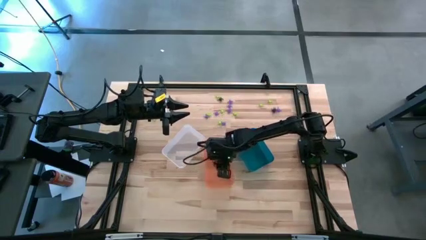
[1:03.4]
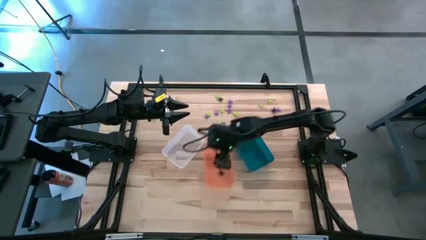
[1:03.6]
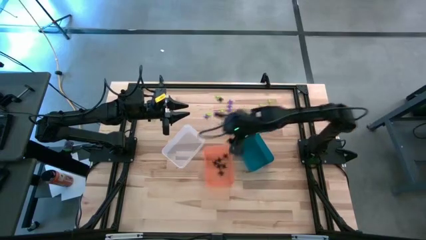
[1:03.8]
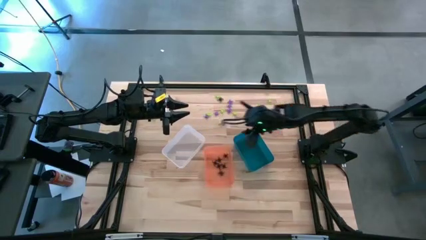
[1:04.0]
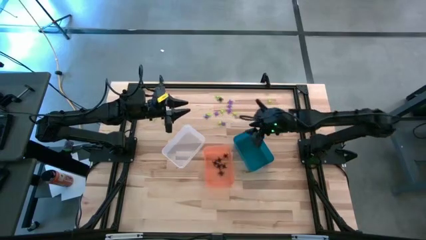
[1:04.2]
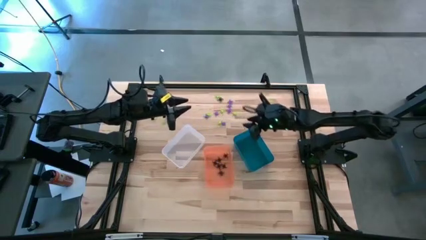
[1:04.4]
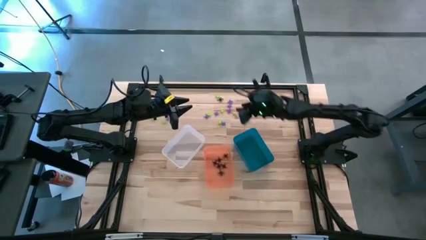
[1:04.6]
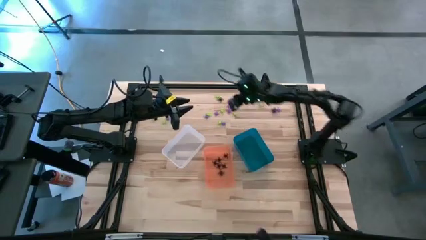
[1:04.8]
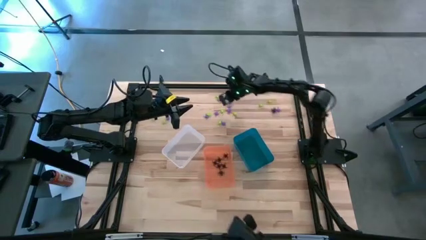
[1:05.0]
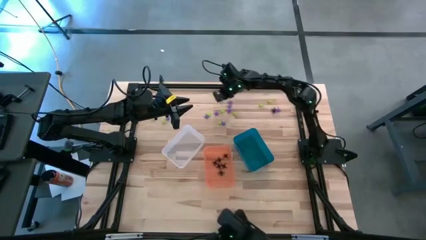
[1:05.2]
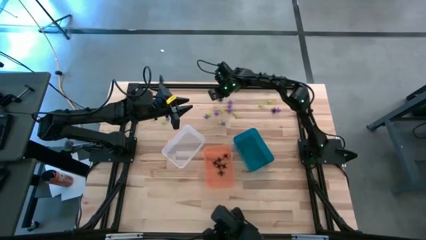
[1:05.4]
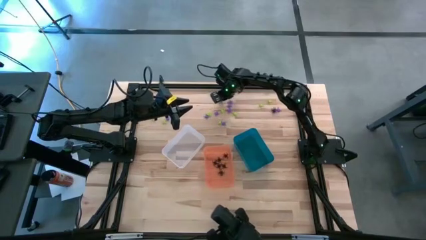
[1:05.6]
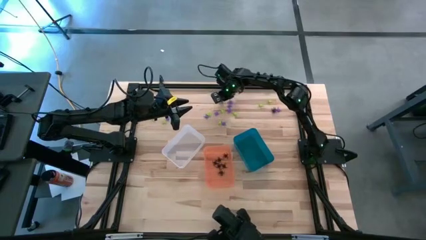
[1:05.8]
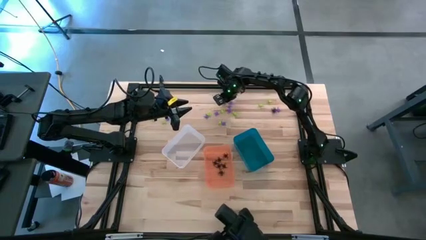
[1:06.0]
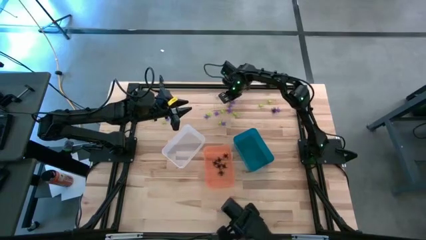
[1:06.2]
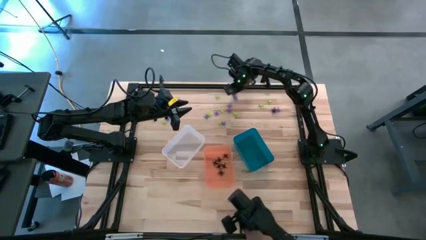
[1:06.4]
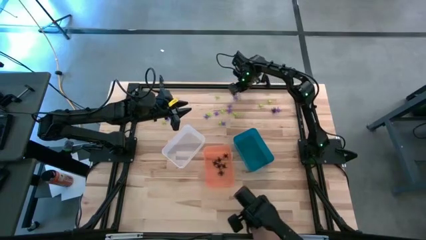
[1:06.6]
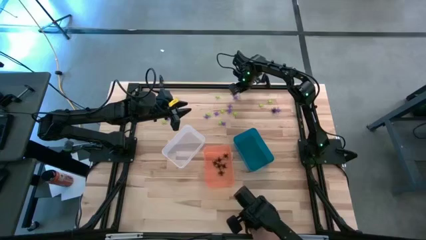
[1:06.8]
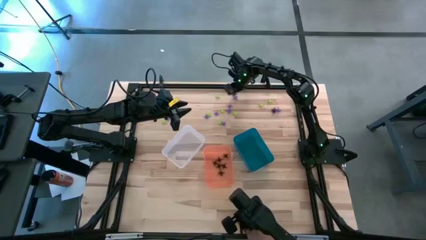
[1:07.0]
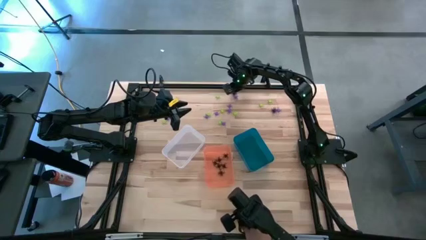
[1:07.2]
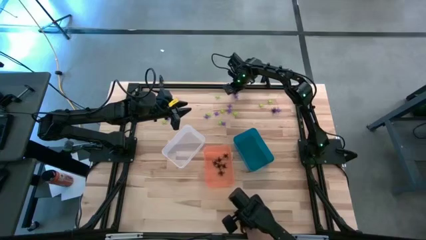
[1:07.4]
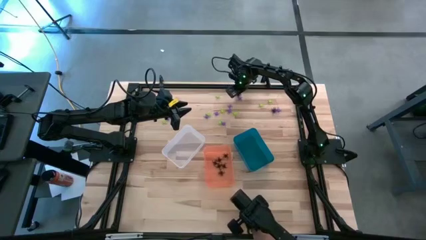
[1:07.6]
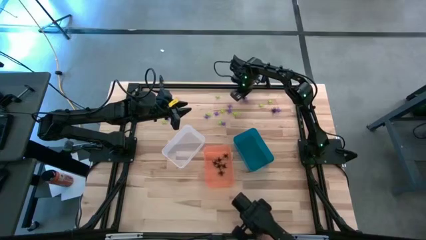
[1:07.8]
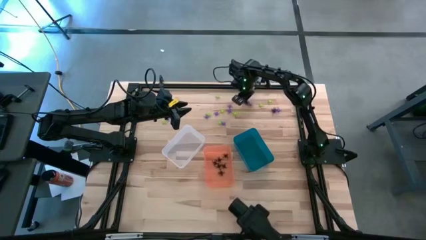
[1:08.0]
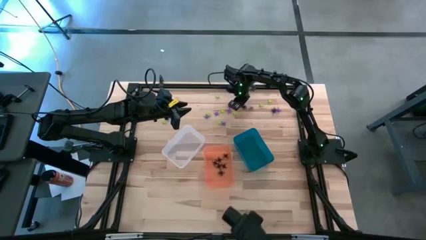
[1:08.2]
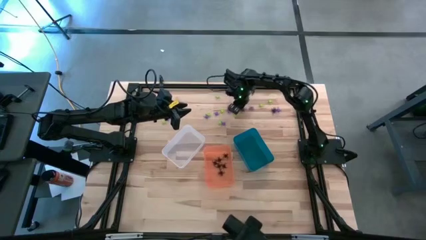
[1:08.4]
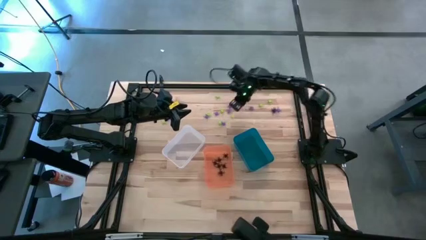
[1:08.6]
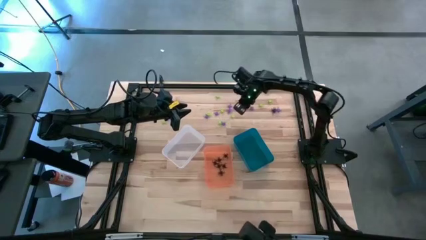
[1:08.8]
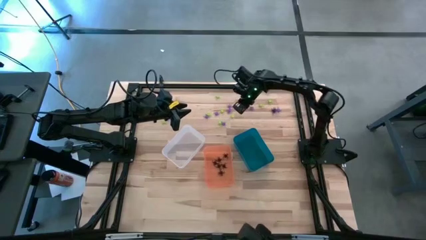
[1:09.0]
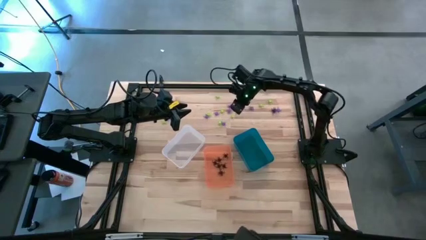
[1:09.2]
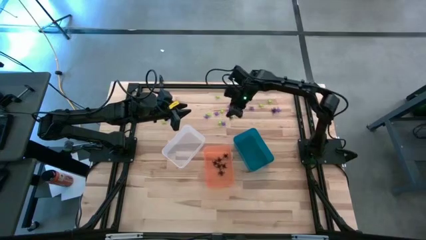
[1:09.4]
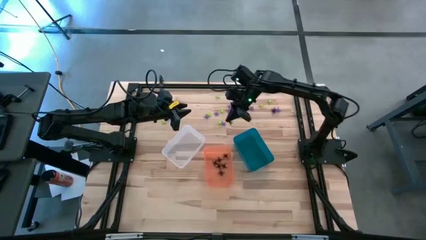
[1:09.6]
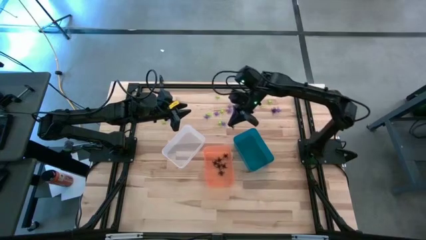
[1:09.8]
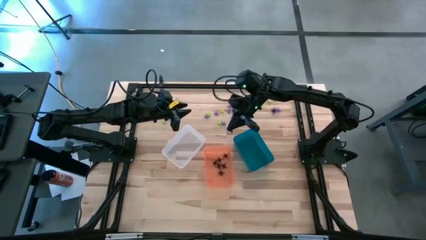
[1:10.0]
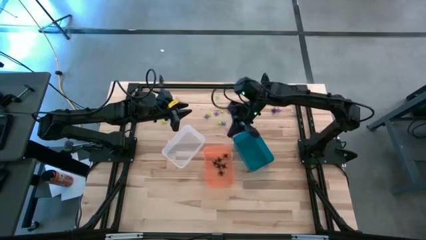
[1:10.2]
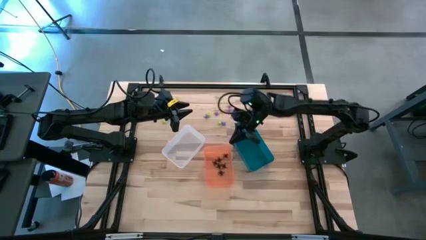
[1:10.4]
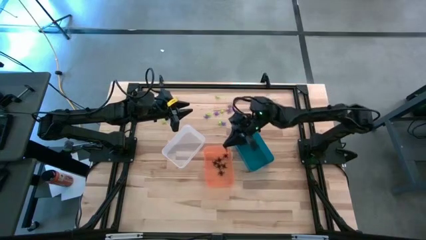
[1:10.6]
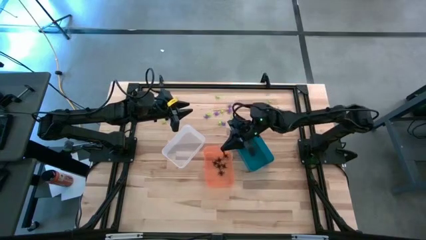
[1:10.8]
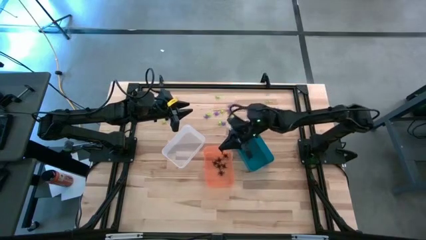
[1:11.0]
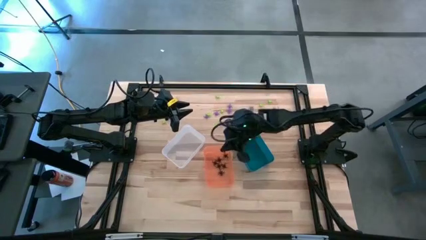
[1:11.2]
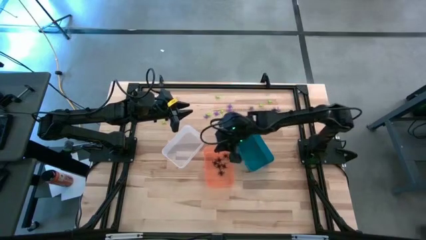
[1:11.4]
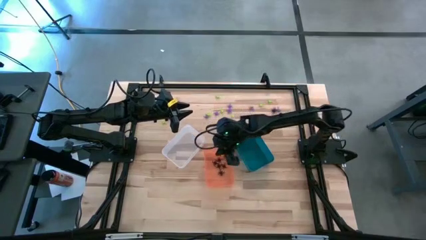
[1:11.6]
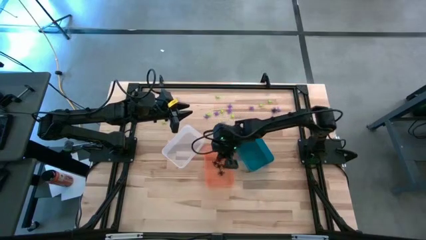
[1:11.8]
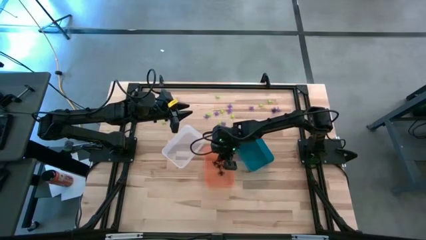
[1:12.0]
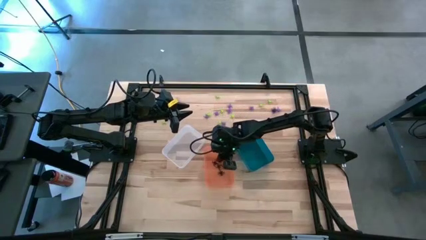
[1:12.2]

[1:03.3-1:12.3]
Task: Sort Halloween decoration
Put the black spider toy into the orange bin

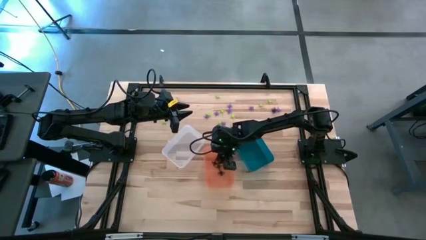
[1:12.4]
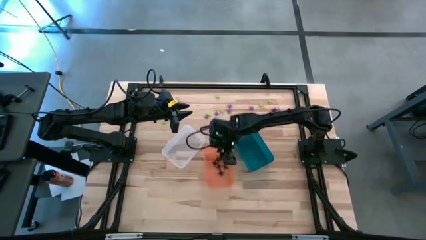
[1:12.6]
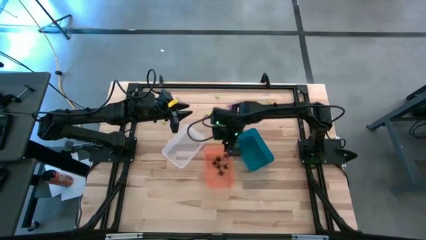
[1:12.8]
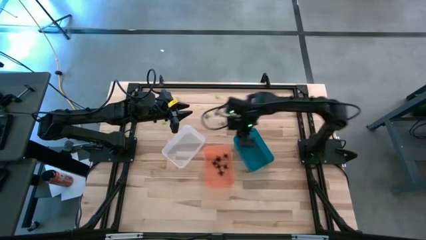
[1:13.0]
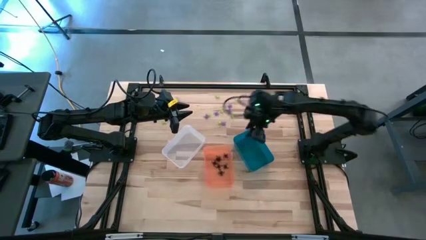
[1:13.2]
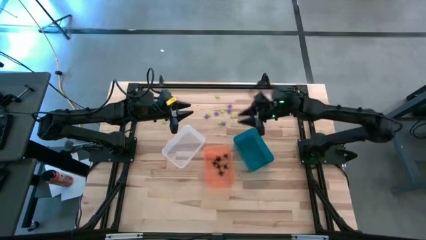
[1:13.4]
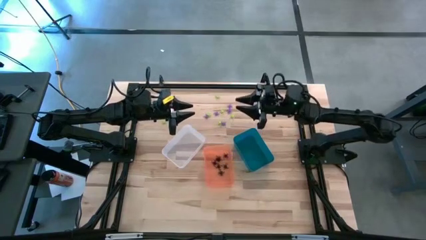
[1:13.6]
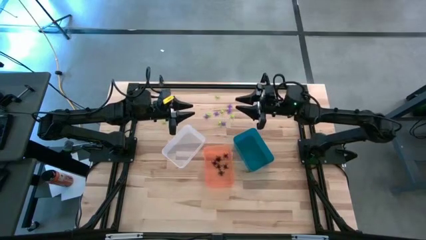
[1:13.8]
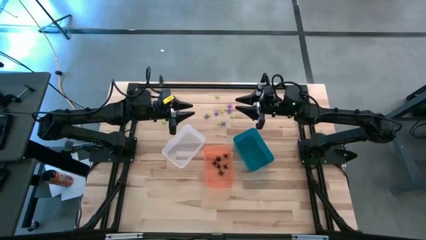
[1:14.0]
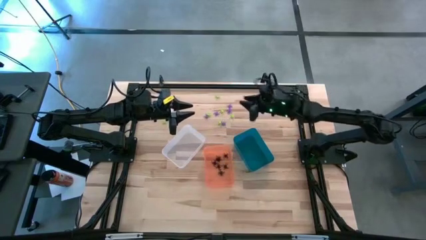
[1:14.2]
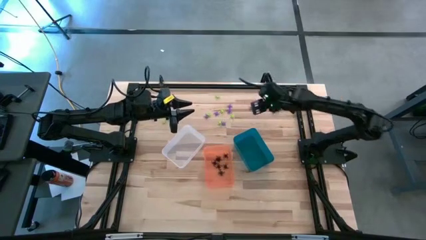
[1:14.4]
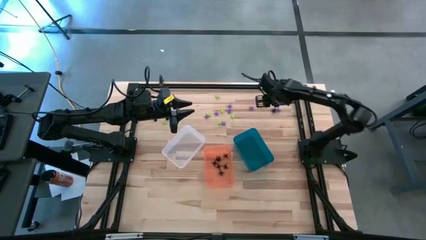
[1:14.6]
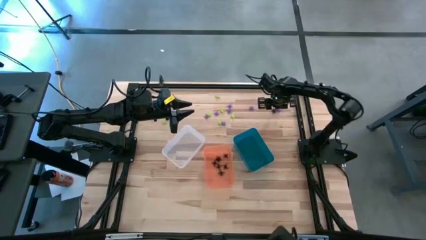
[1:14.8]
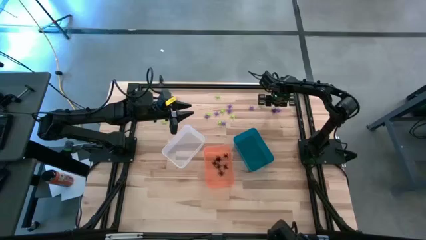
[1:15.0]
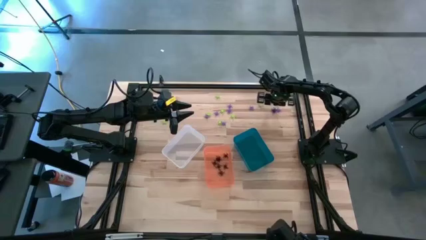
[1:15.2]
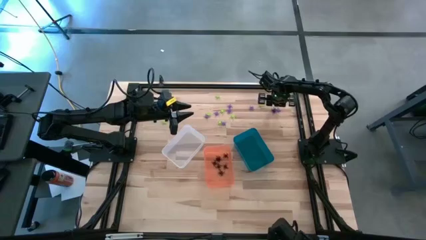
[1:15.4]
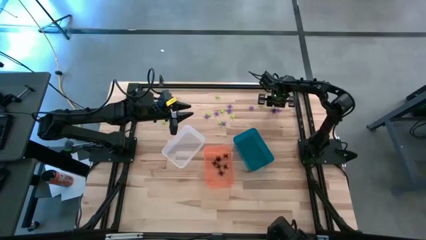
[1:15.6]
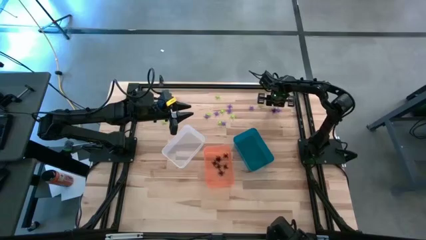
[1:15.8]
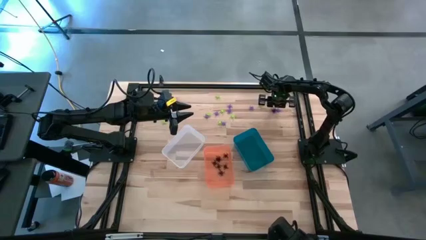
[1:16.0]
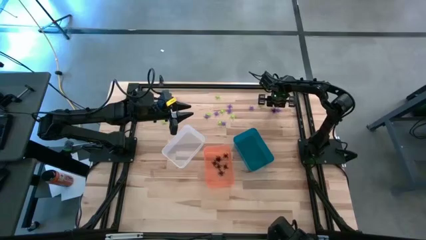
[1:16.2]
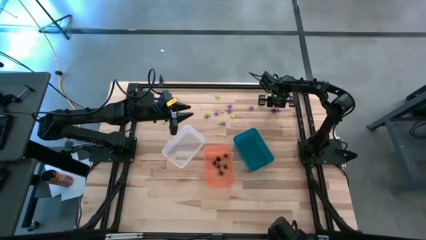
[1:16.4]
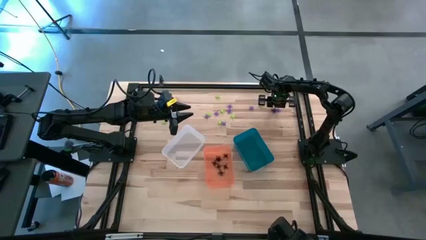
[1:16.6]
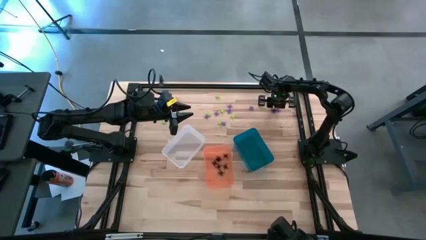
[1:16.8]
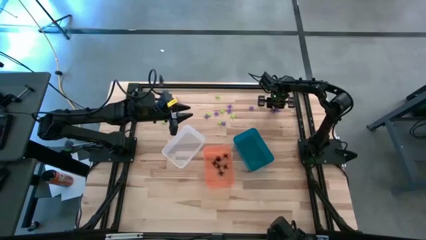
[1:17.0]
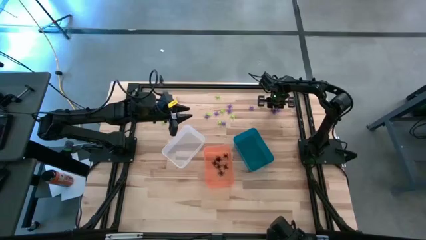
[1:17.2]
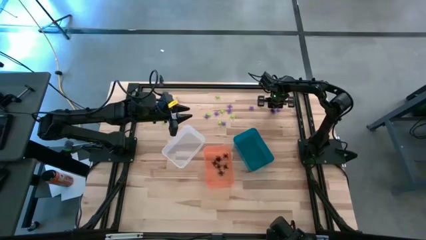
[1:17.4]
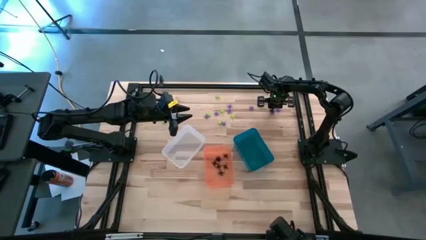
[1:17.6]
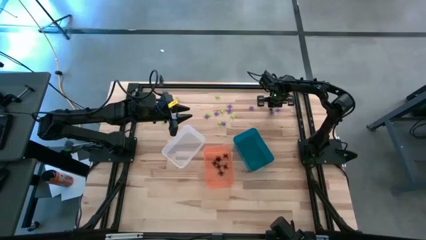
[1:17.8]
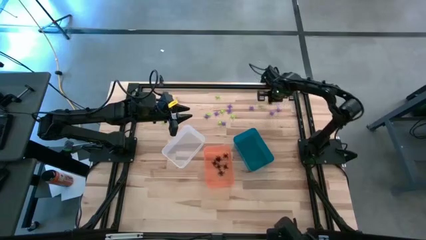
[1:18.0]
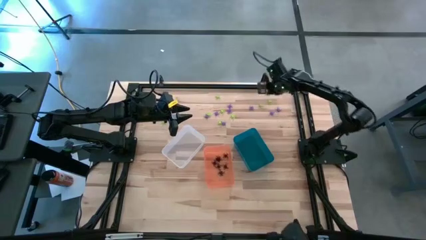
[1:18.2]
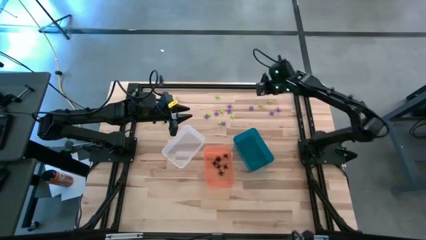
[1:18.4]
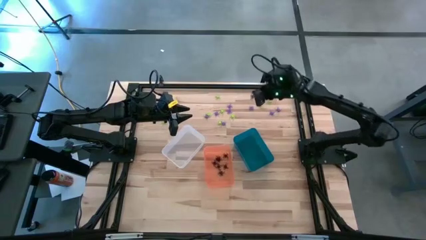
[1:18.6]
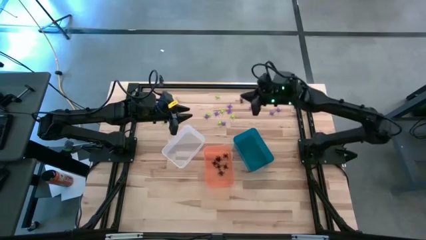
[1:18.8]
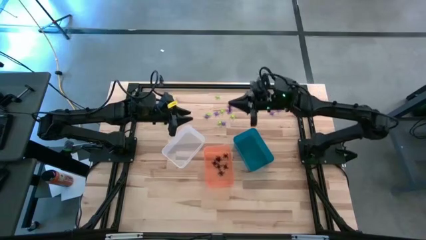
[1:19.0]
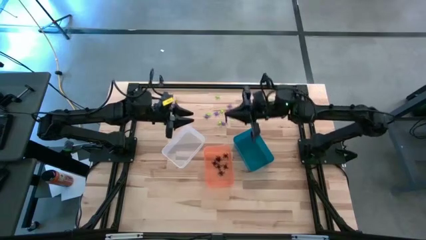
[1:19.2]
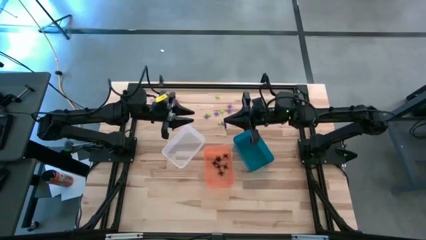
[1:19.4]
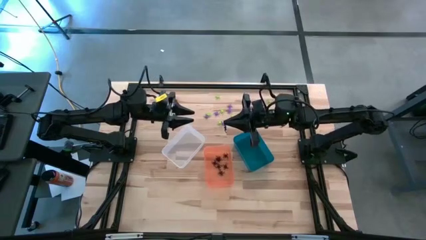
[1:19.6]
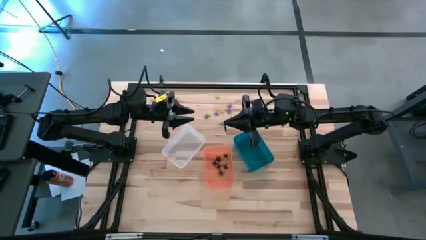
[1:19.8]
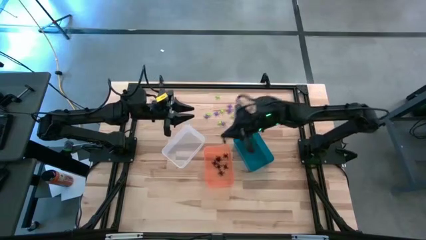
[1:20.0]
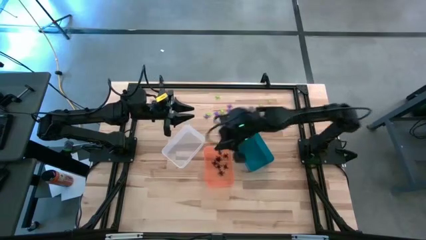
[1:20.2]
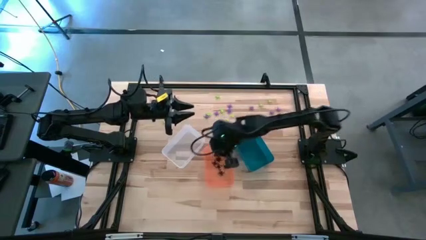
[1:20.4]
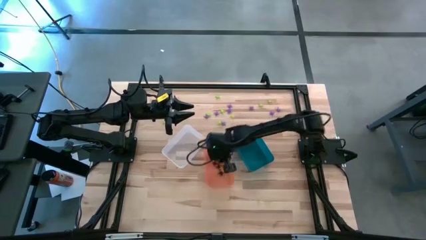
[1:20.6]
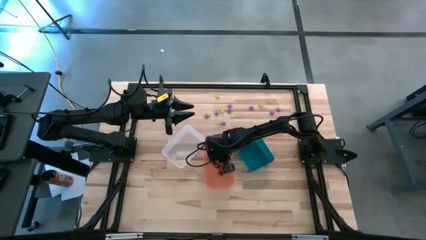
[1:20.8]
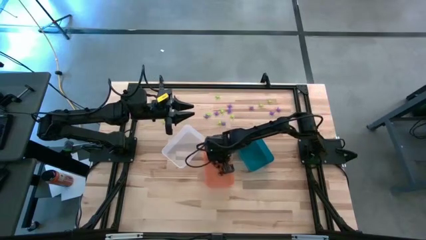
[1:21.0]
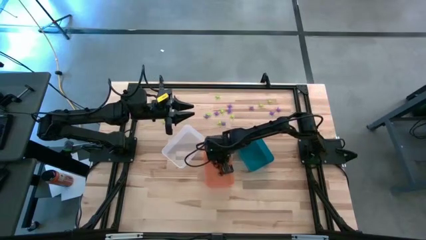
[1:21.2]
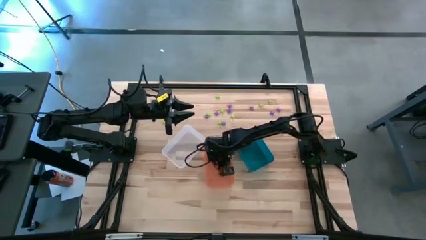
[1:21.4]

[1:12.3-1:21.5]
Put the black spider toy into the orange bin
